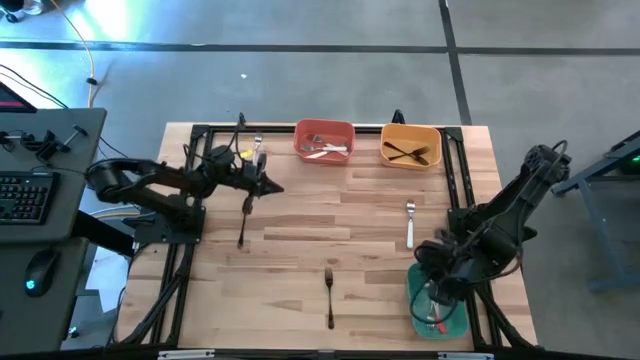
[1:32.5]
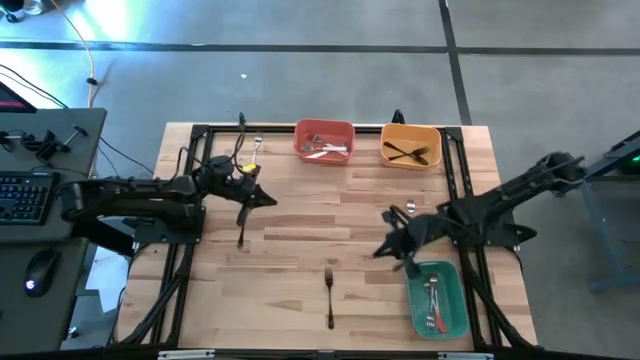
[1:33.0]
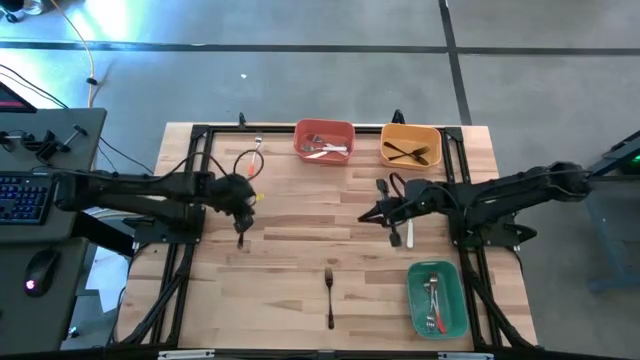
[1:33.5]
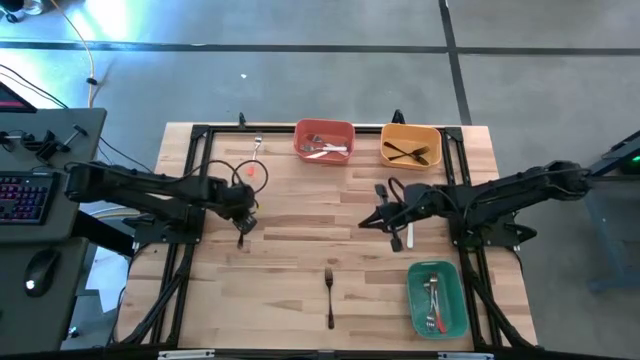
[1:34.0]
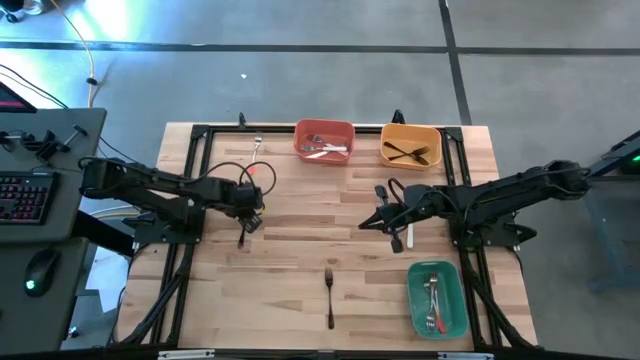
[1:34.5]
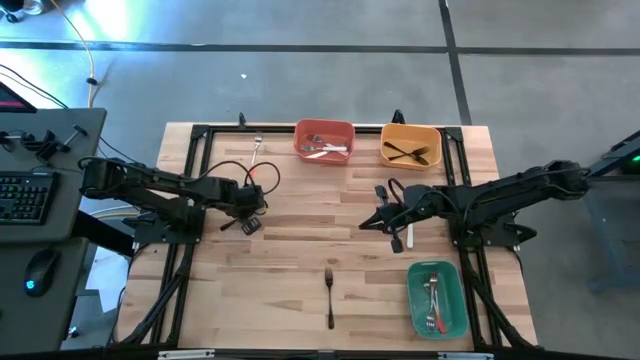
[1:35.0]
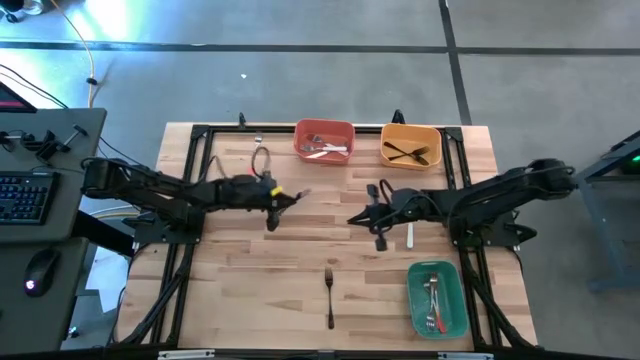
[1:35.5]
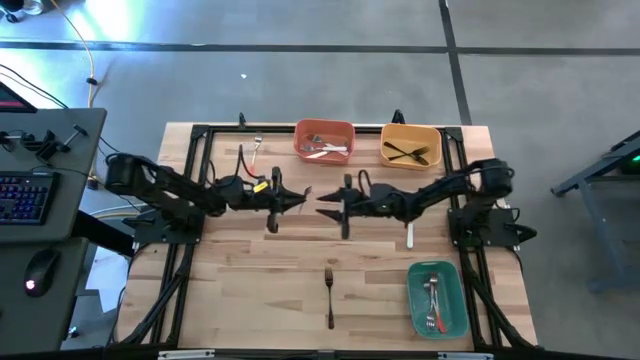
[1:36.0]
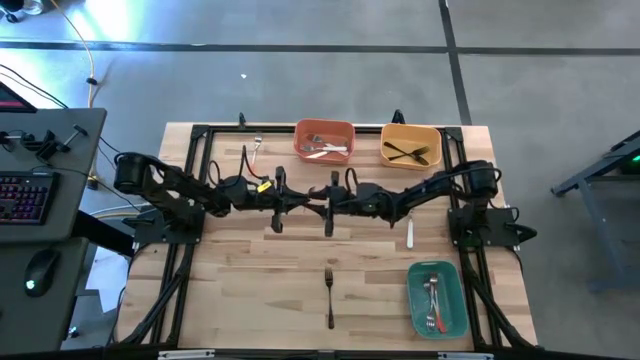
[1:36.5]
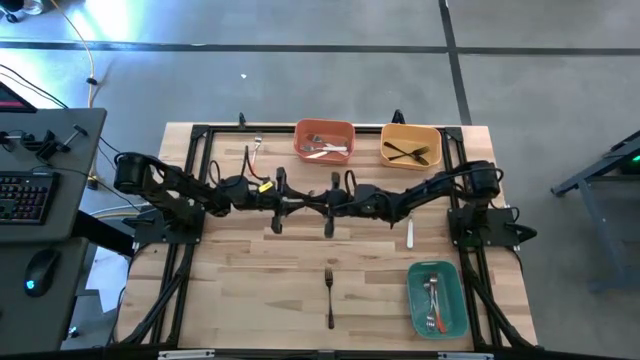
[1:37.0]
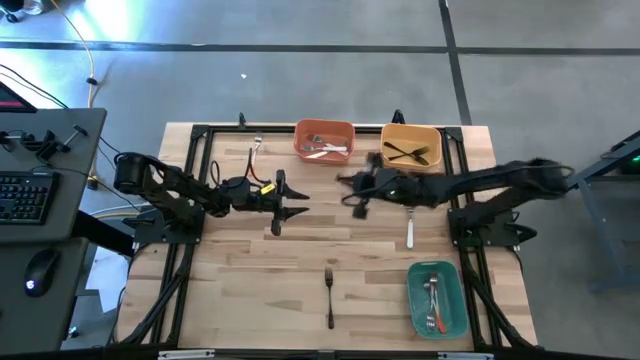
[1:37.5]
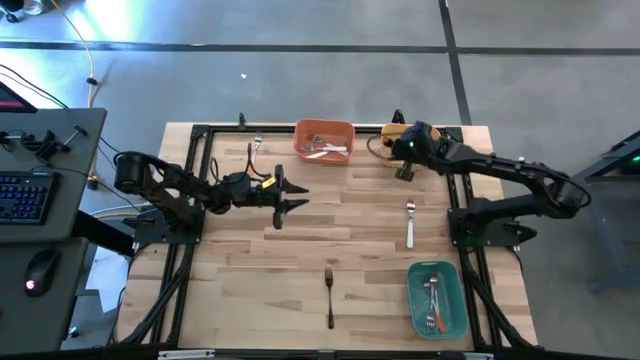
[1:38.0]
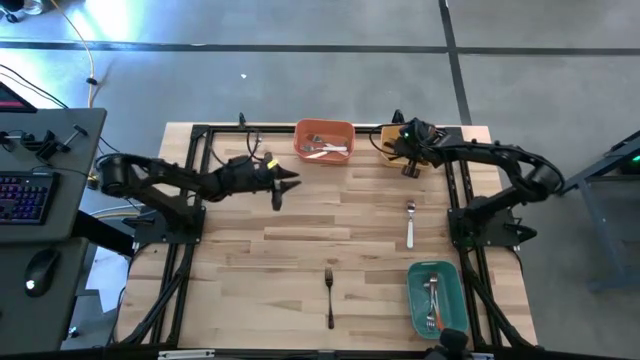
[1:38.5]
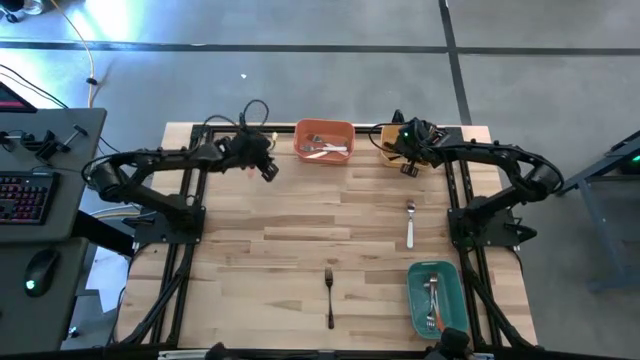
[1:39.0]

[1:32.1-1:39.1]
Task: Sort silverware by color (type)
Put the black fork into the yellow bin

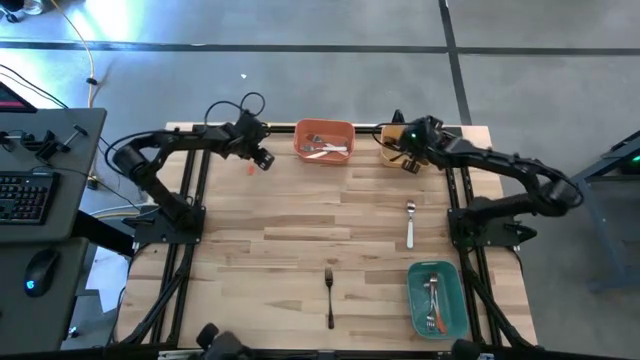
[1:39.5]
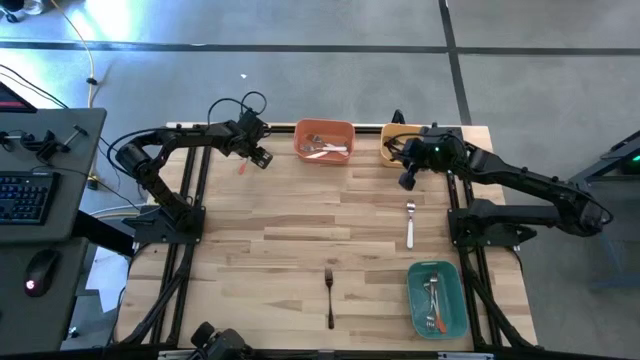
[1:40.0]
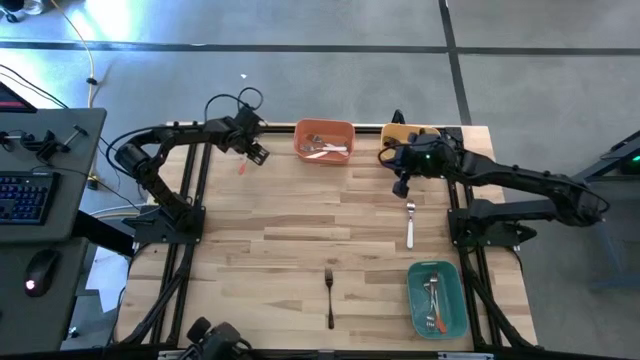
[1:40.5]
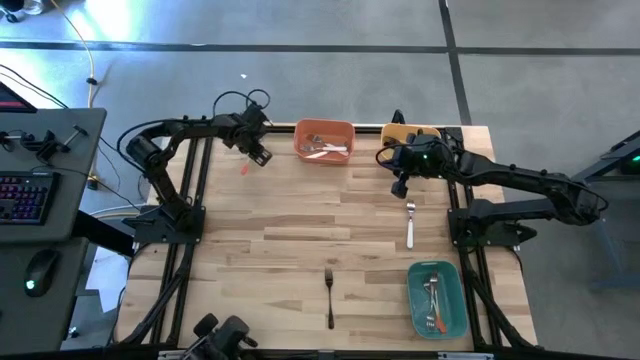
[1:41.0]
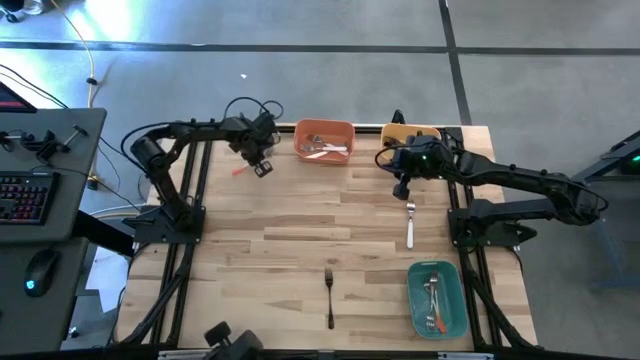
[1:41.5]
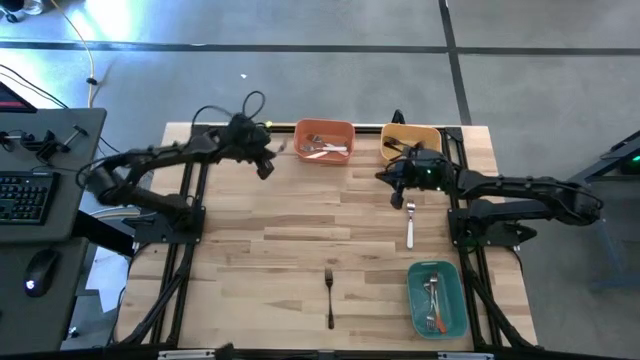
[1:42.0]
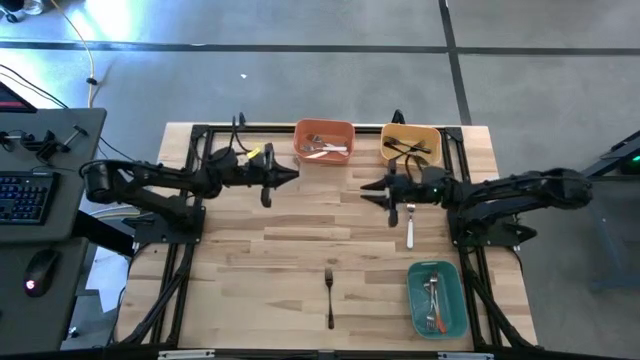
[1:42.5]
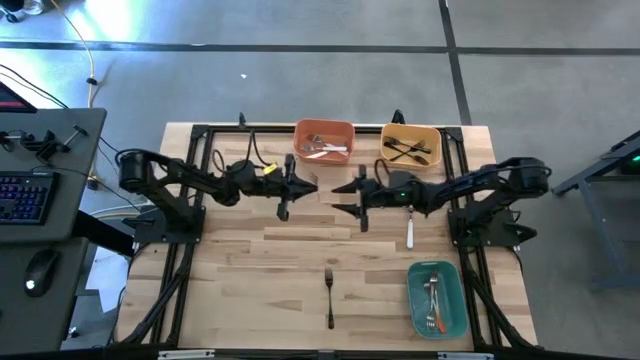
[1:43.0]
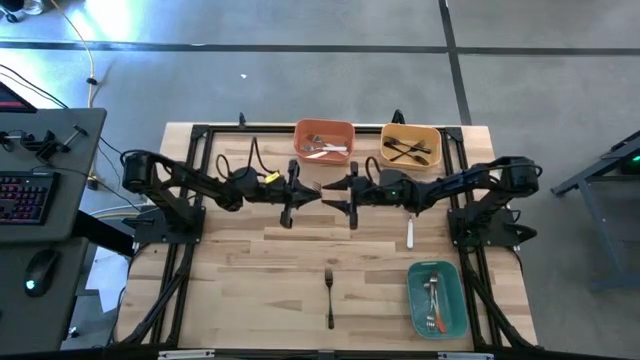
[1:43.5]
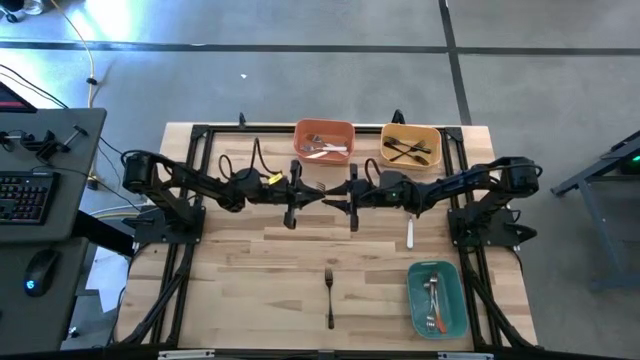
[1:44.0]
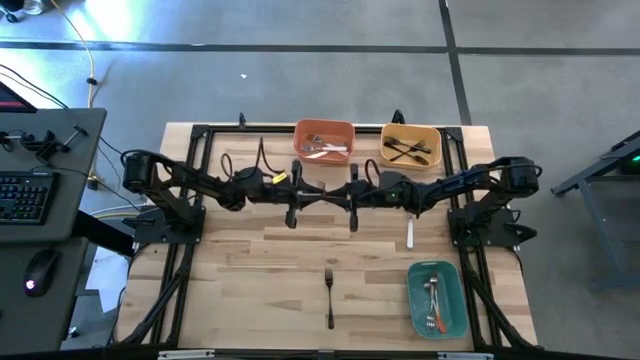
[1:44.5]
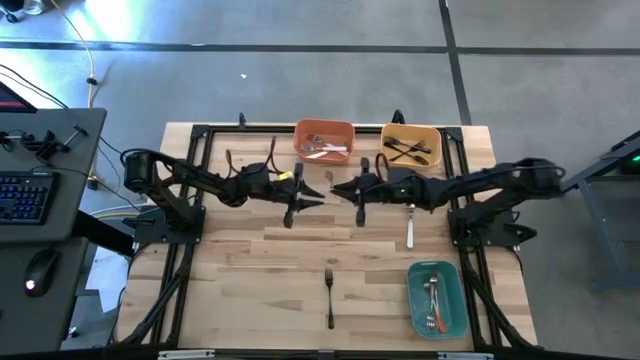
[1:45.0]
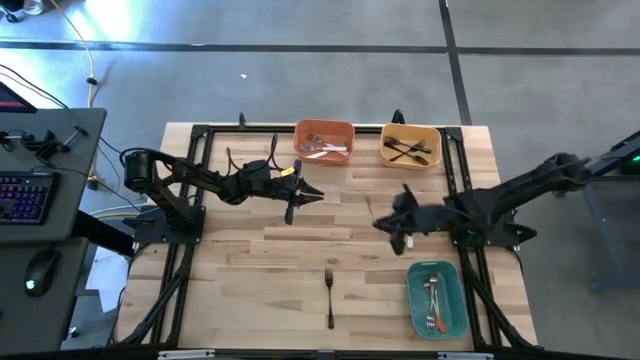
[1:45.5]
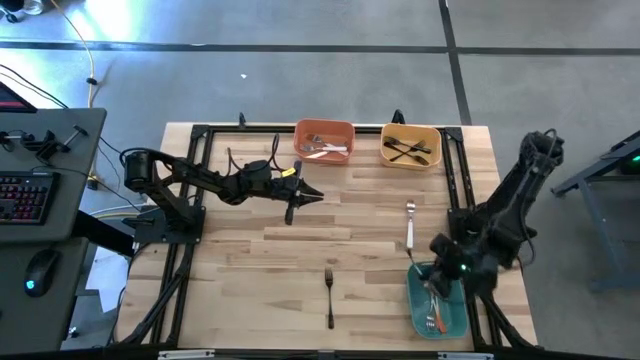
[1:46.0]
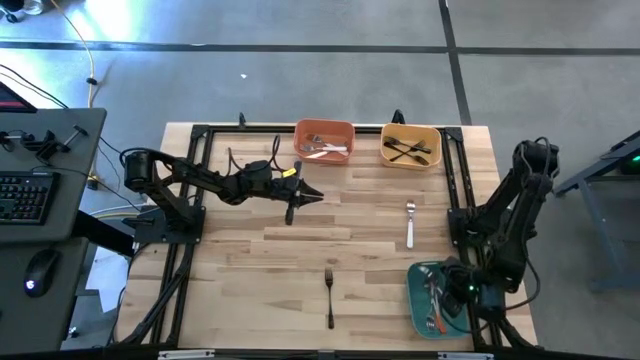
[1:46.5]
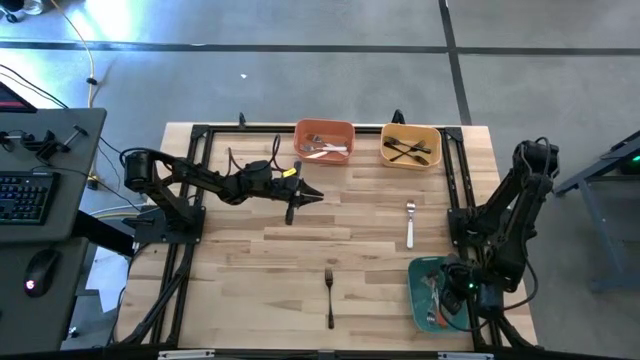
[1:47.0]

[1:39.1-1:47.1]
Put the orange fork into the green bin

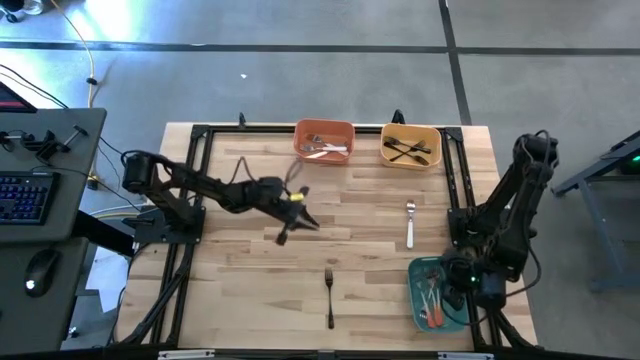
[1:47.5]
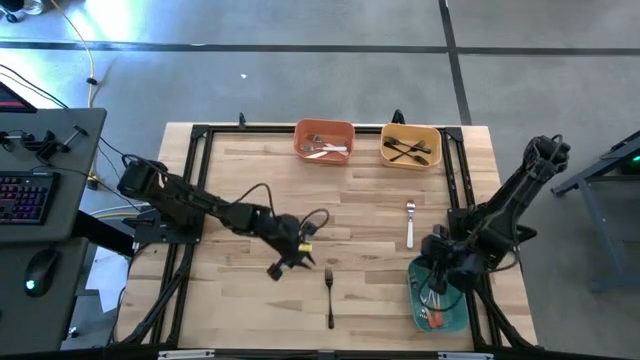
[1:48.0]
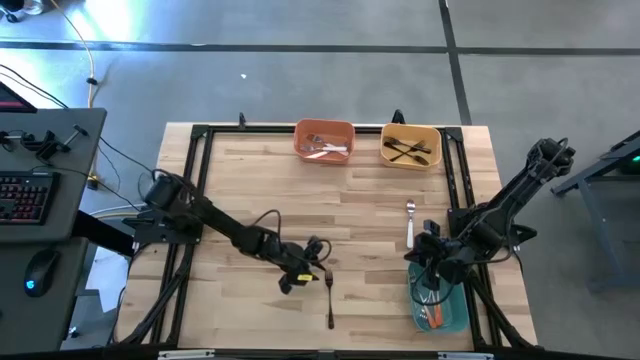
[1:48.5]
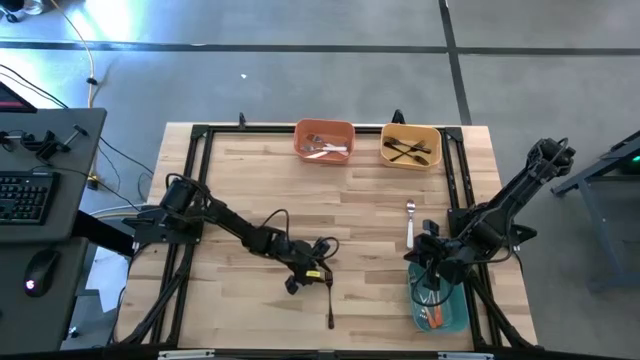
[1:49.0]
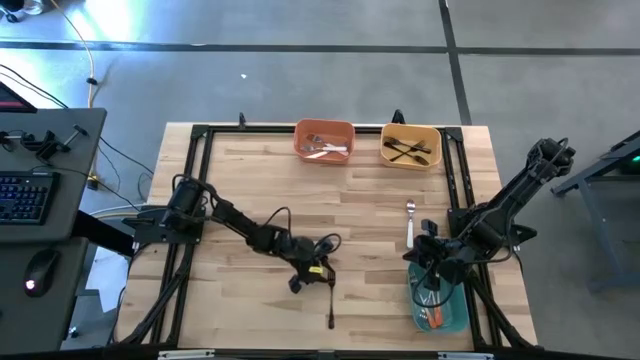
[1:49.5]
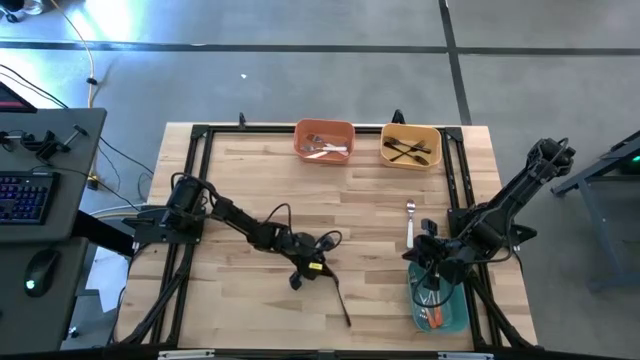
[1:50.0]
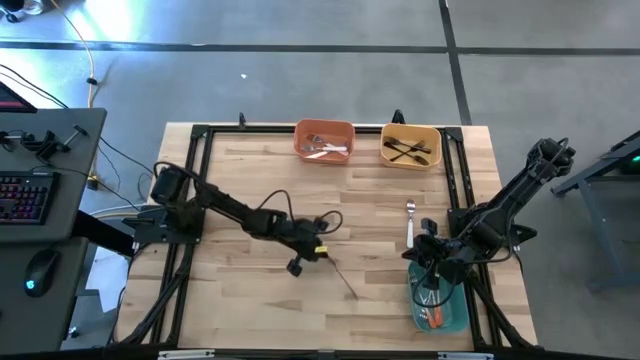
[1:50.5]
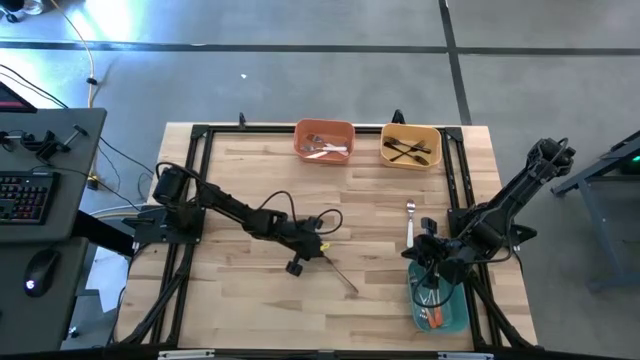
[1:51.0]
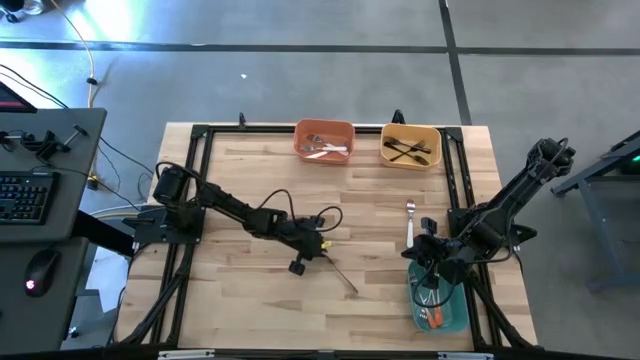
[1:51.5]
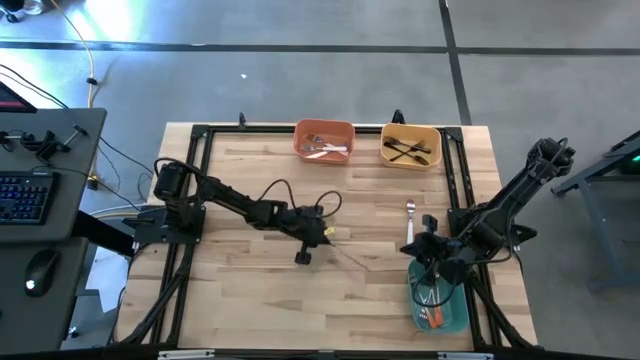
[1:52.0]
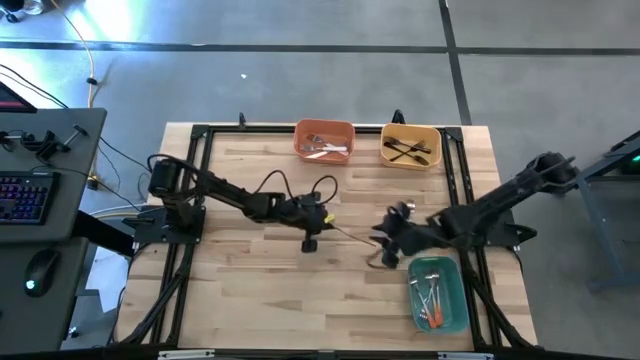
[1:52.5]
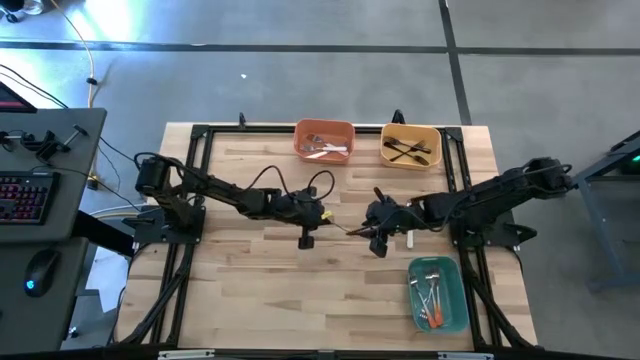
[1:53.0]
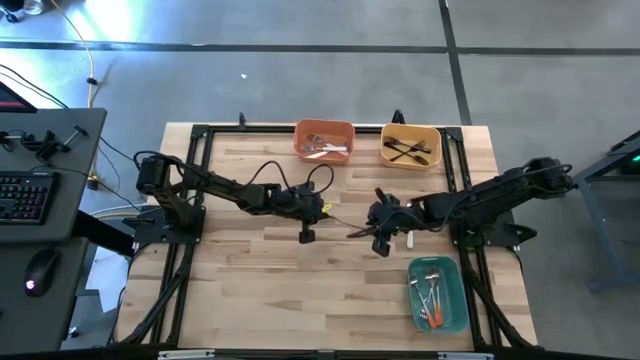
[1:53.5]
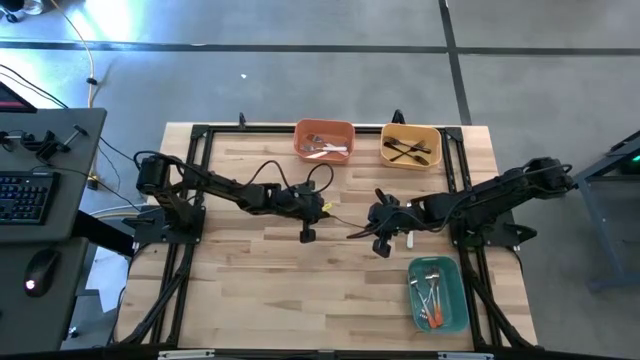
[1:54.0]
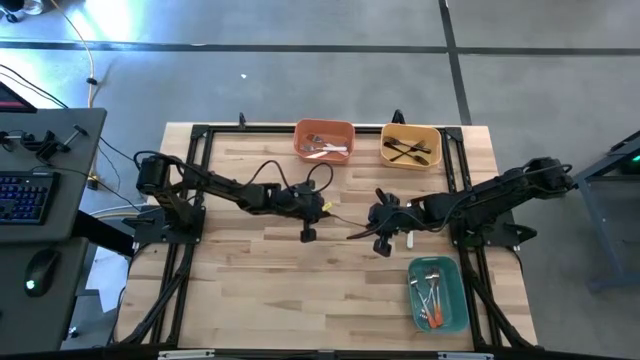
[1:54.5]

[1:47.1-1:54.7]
Put the black fork into the yellow bin
